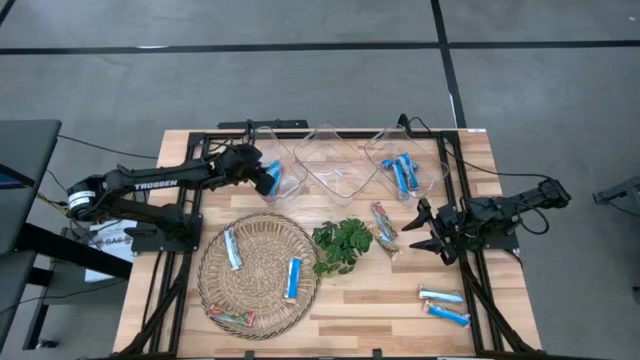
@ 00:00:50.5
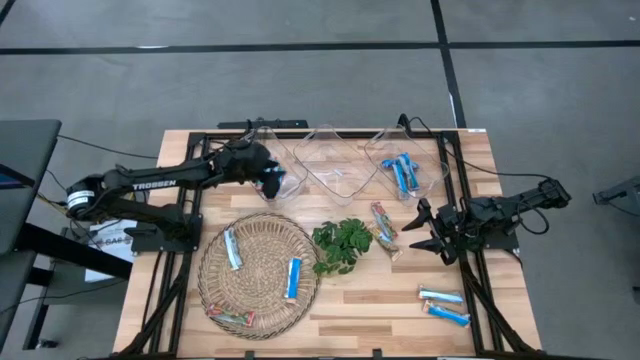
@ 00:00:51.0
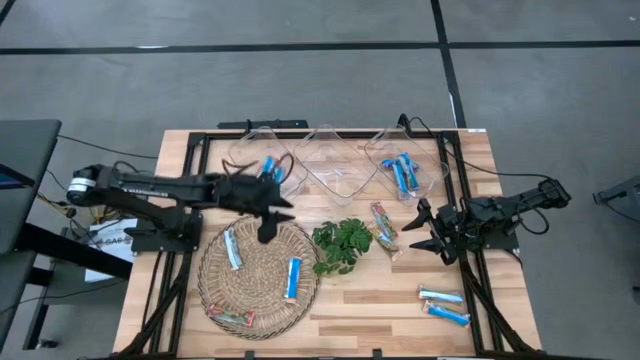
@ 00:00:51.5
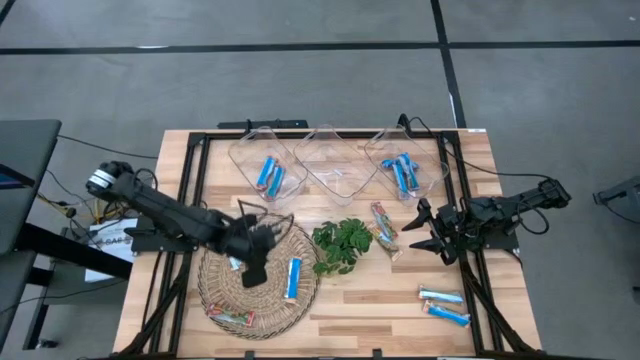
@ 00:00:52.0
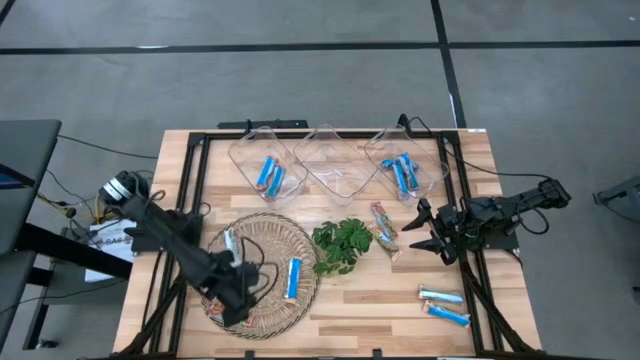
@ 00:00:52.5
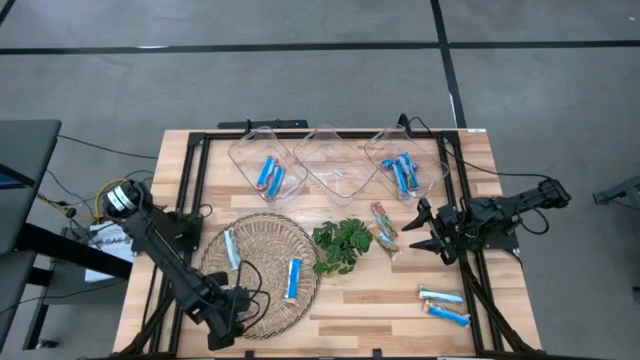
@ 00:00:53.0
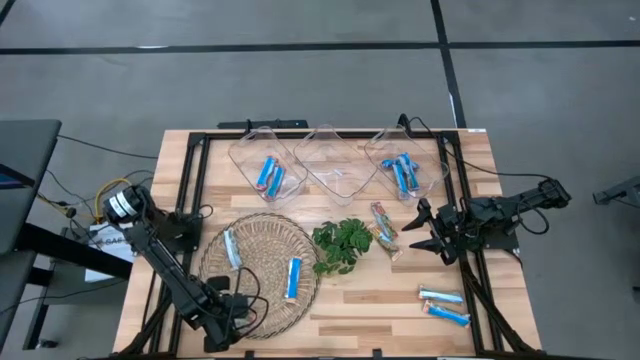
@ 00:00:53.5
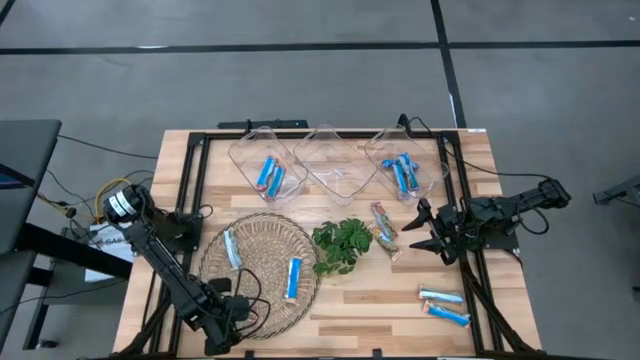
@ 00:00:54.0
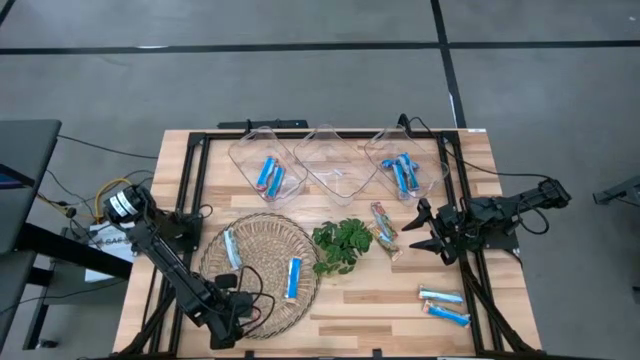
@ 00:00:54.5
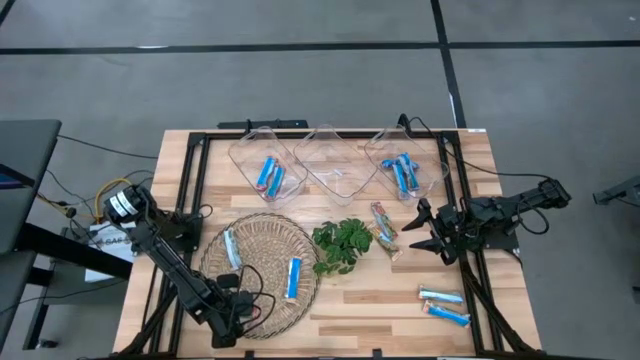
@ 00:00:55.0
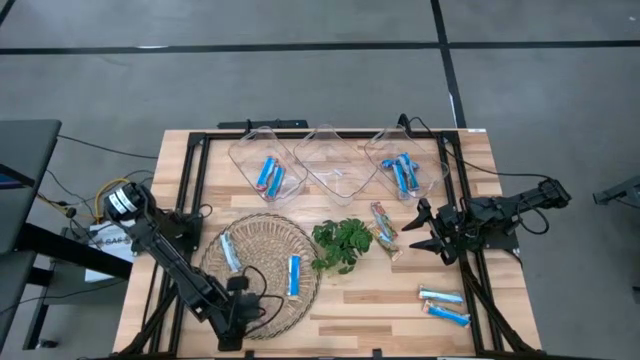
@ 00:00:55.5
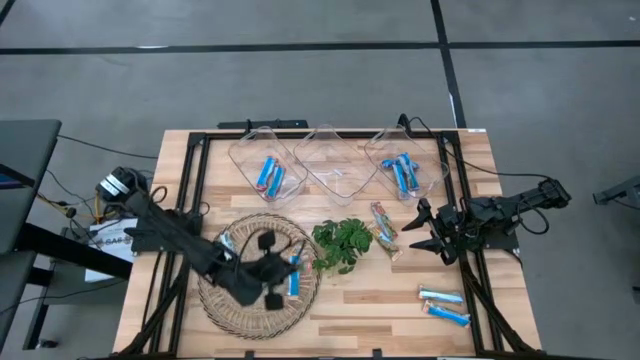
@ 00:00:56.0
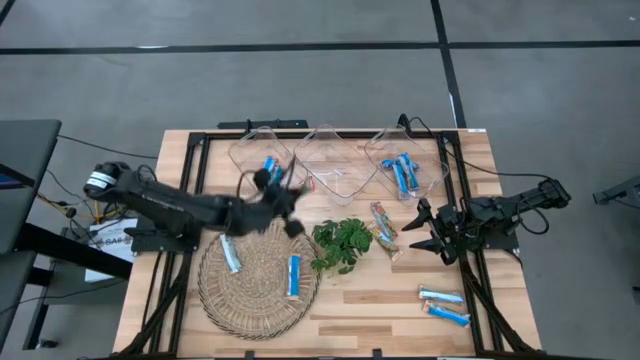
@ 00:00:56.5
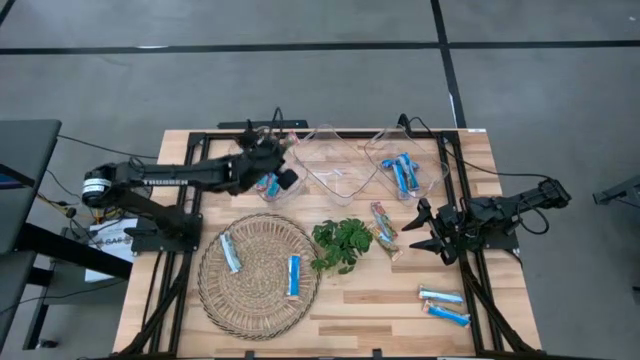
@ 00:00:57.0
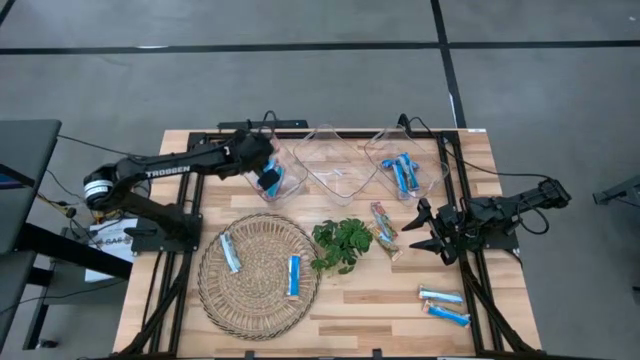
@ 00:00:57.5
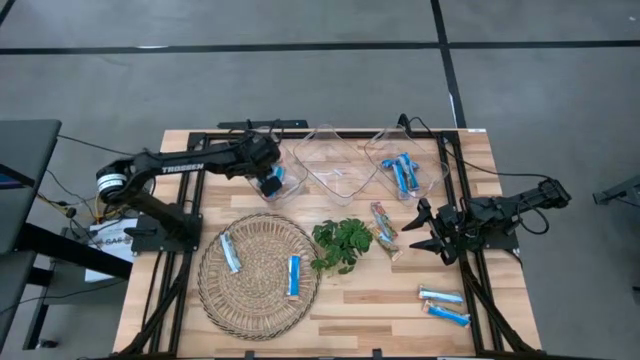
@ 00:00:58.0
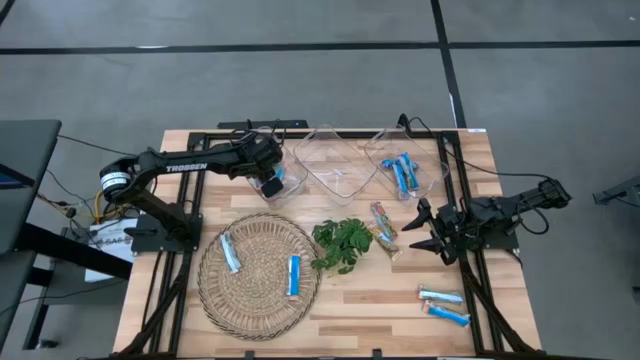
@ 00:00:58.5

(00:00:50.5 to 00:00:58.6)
Task: Pick and place Granola Bars by type
Put the red granola bar into the left transparent bin

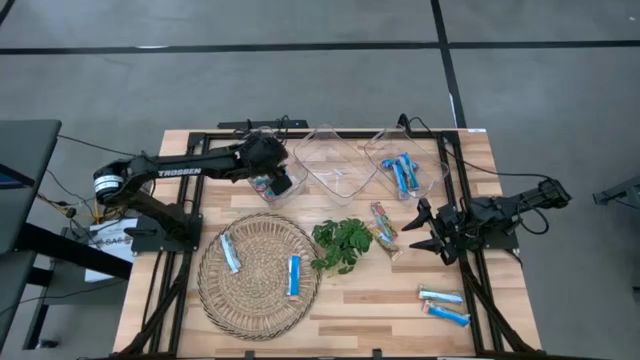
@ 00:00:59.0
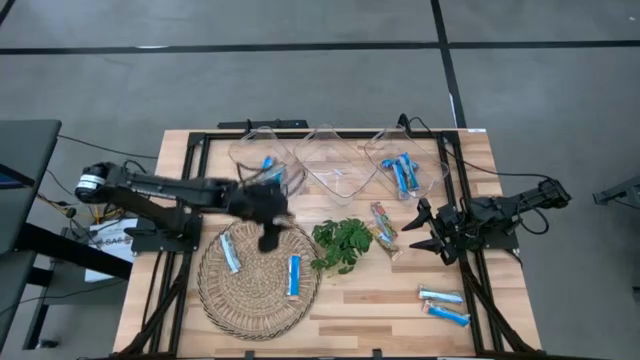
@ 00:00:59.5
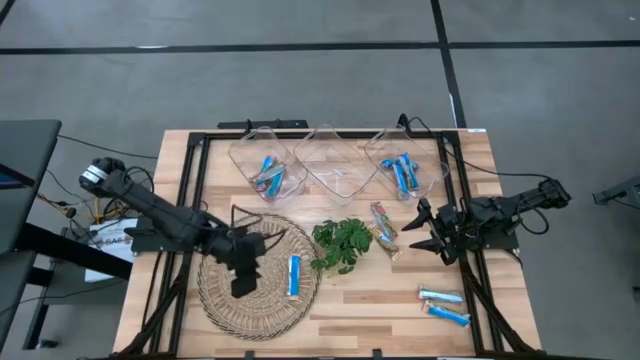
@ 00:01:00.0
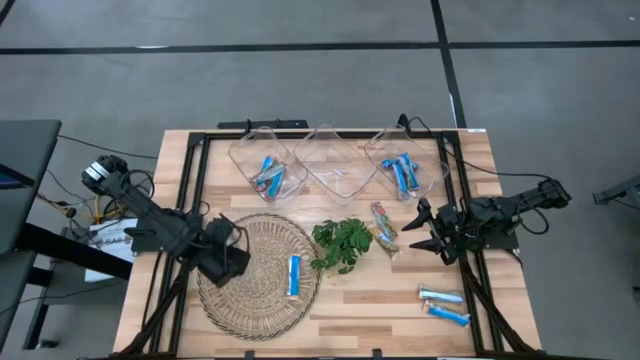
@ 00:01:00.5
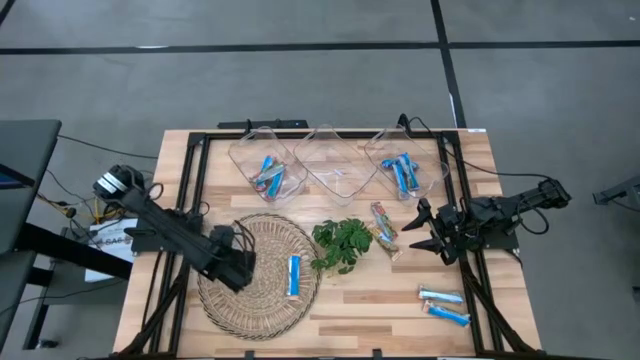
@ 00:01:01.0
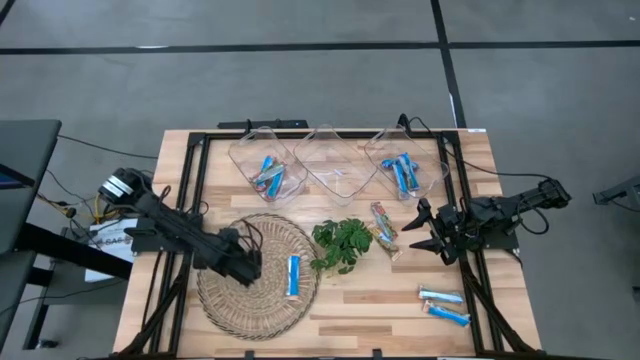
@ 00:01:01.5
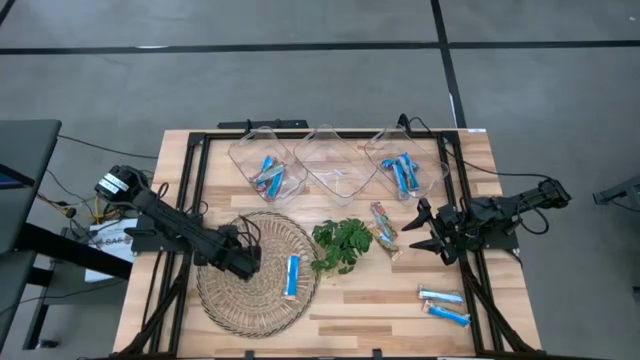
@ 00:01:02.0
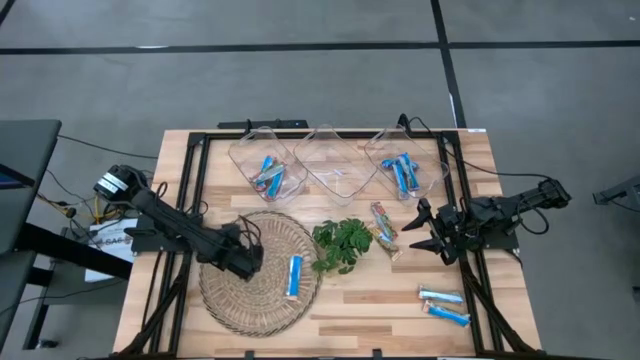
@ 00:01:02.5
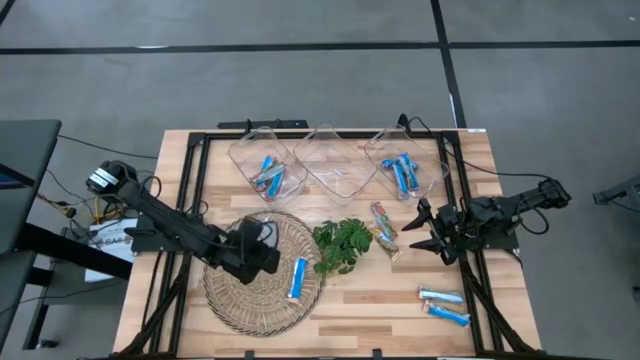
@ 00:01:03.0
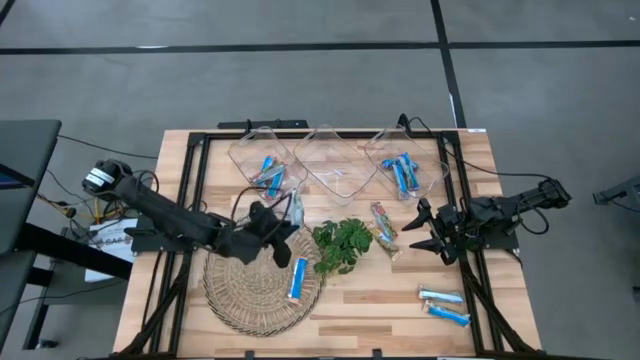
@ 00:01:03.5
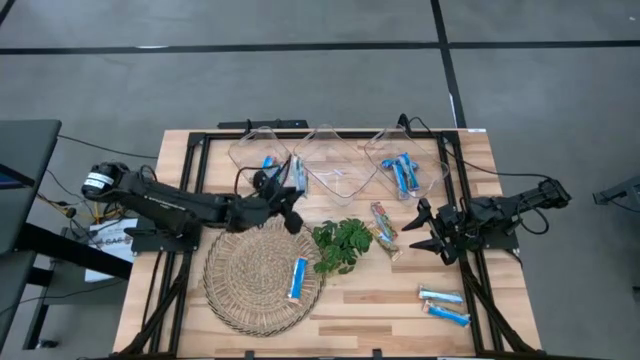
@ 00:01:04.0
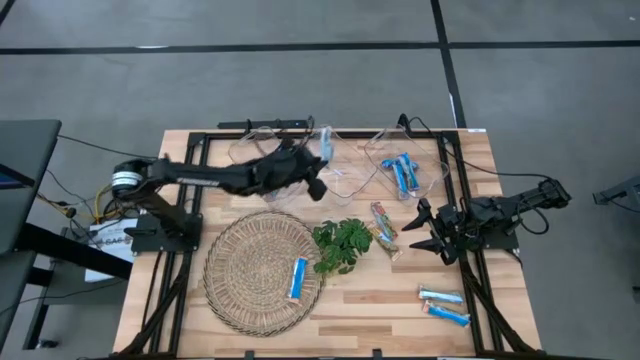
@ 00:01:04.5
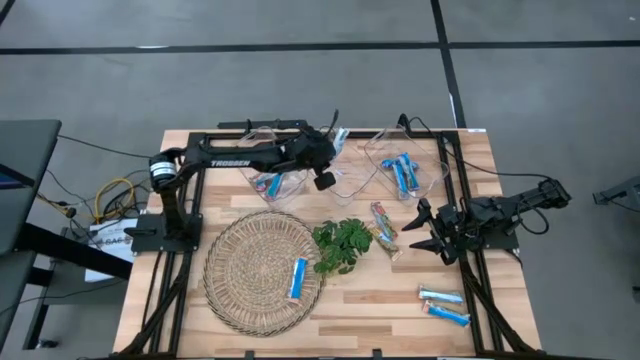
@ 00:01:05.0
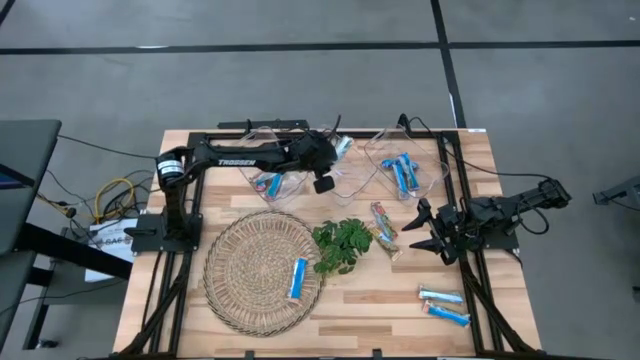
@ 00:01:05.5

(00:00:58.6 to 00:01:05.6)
Put the yellow granola bar into the middle transparent bin

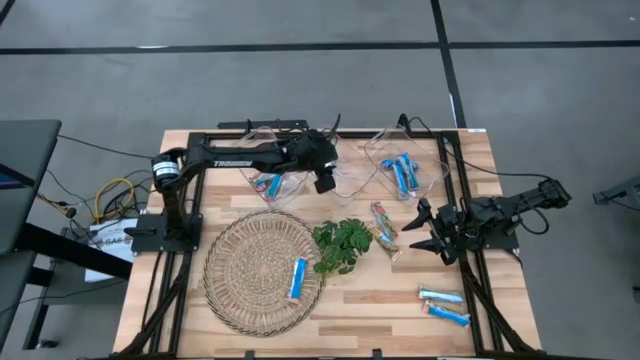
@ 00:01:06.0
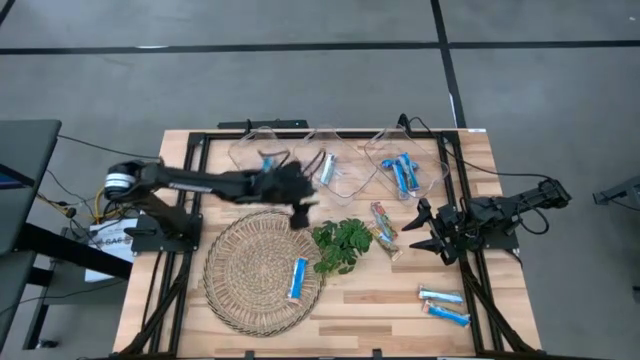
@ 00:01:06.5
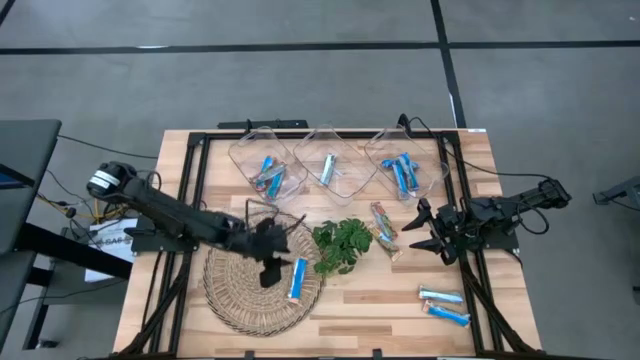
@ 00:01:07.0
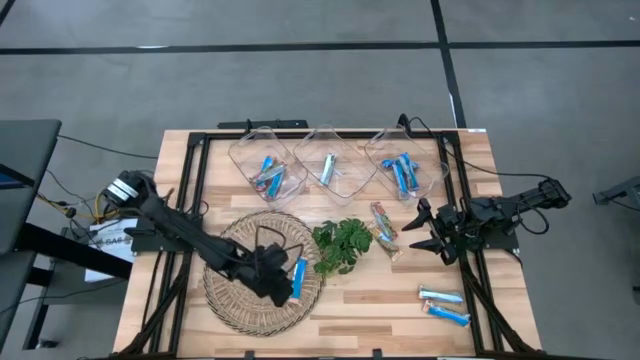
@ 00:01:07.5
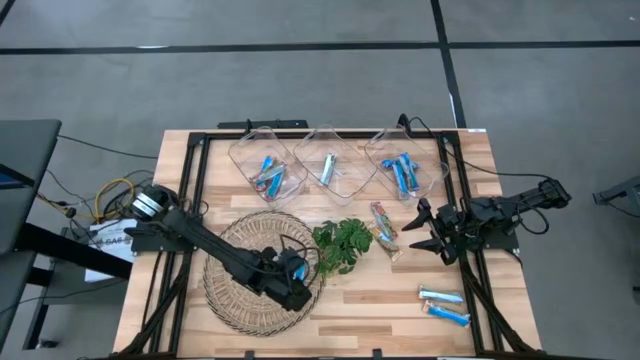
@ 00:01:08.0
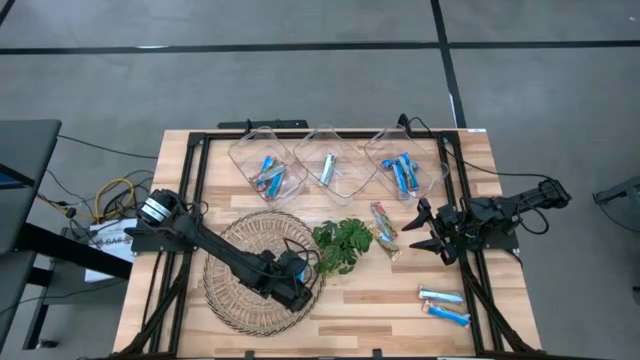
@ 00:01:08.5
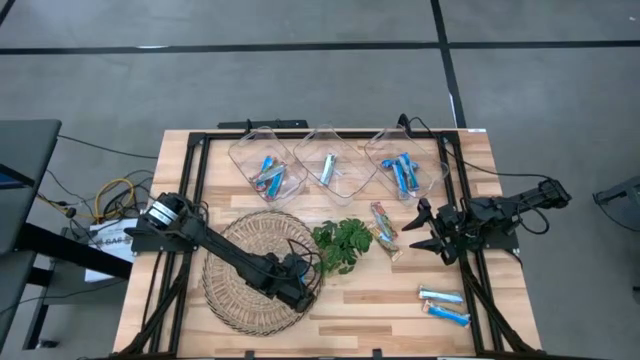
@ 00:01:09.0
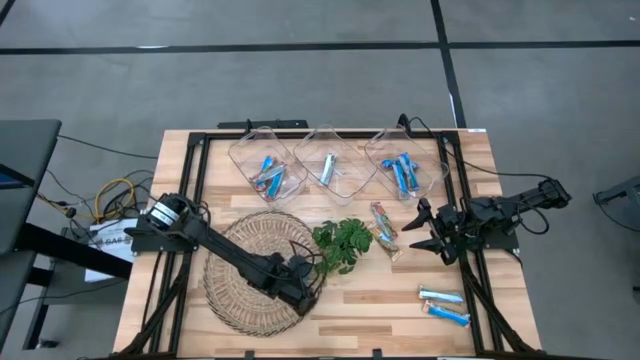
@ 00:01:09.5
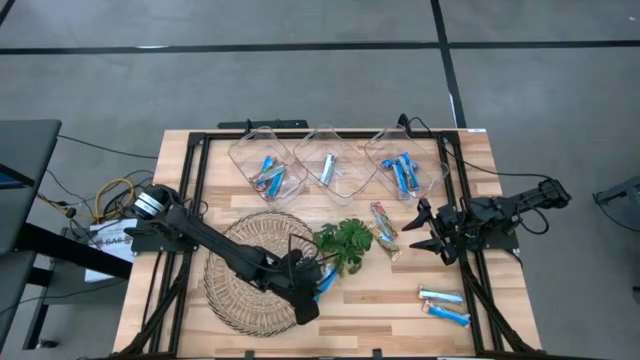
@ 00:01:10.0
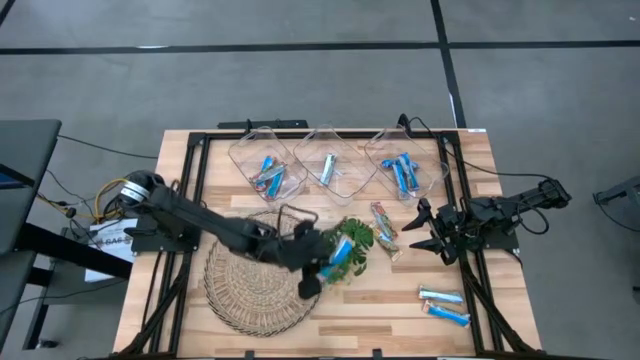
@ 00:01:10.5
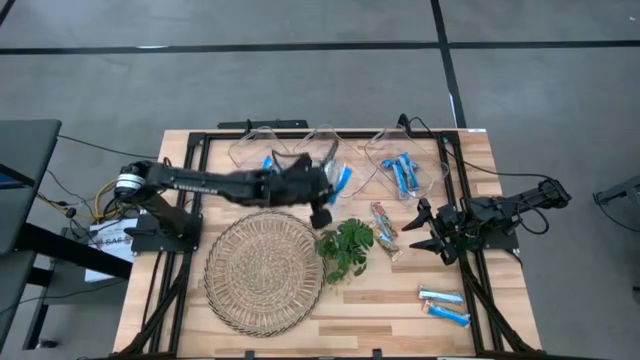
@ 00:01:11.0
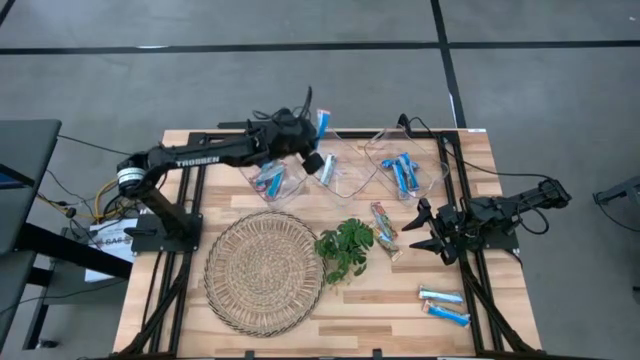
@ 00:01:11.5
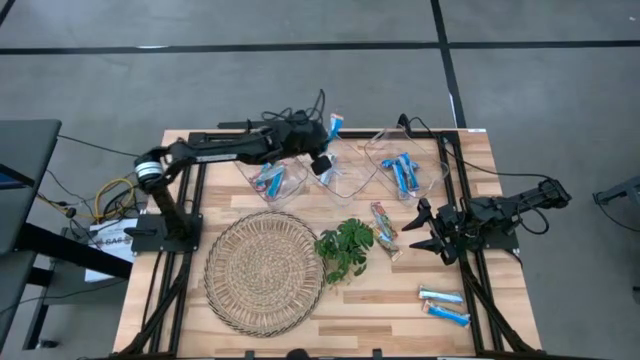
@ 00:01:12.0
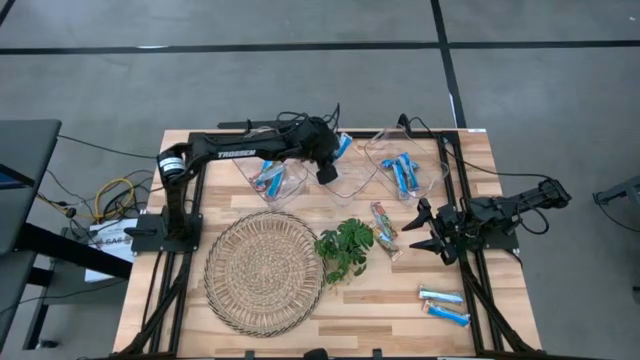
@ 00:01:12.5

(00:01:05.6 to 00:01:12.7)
Put the yellow granola bar into the middle transparent bin
